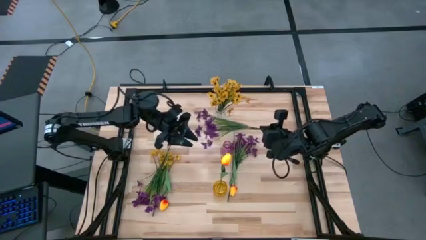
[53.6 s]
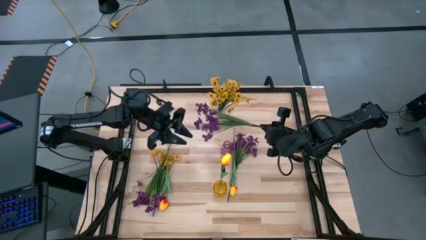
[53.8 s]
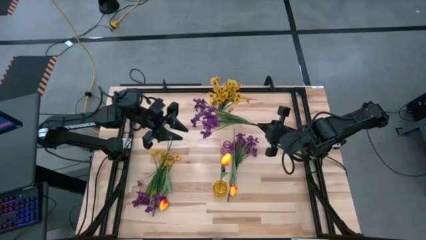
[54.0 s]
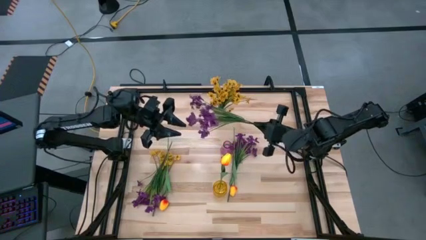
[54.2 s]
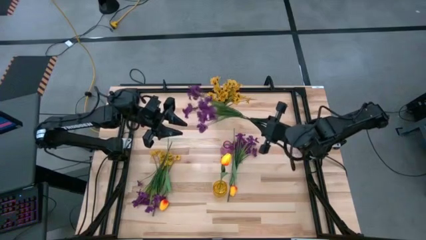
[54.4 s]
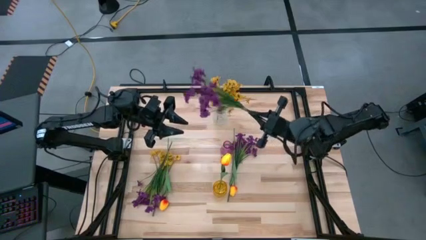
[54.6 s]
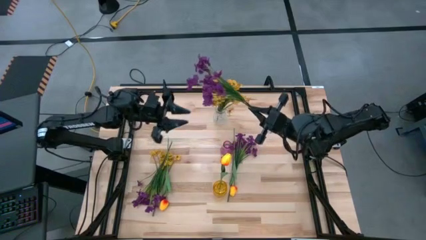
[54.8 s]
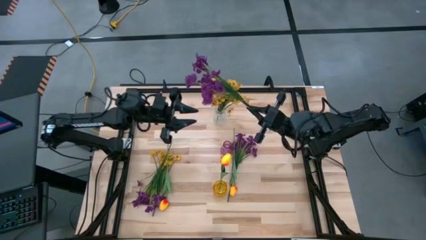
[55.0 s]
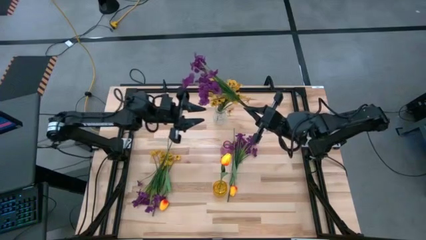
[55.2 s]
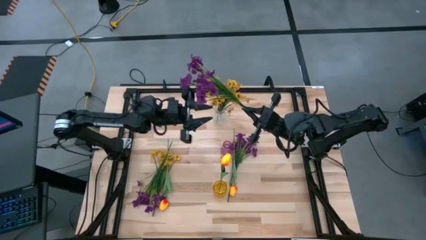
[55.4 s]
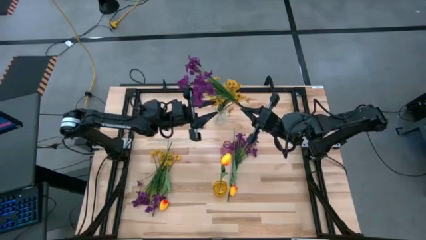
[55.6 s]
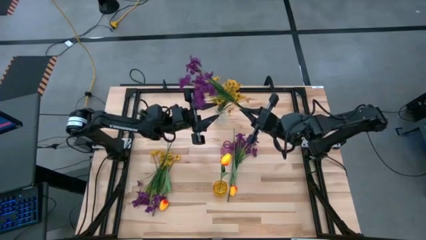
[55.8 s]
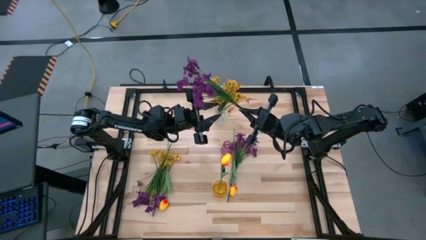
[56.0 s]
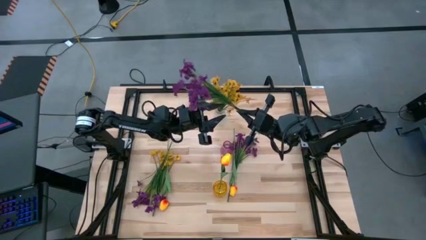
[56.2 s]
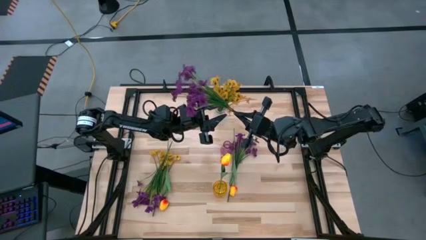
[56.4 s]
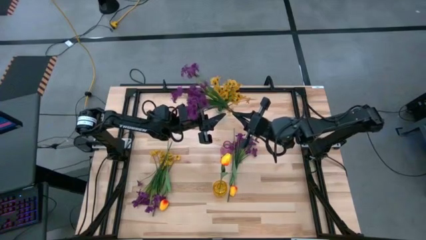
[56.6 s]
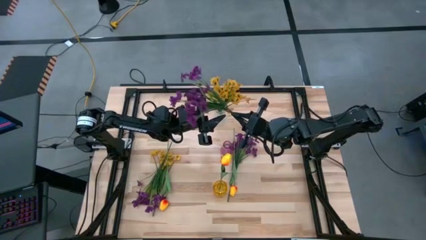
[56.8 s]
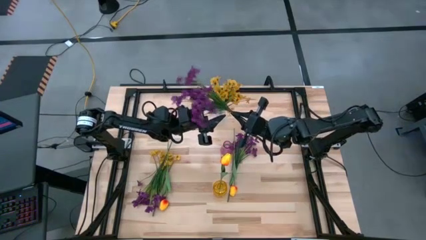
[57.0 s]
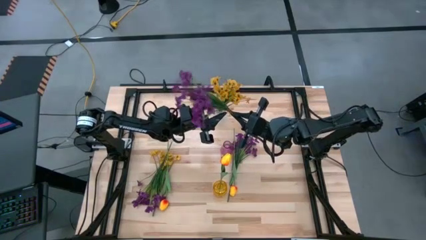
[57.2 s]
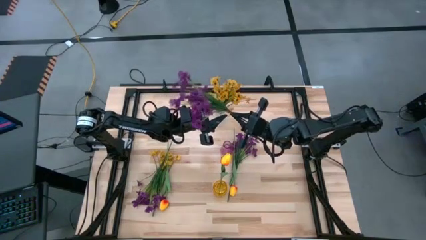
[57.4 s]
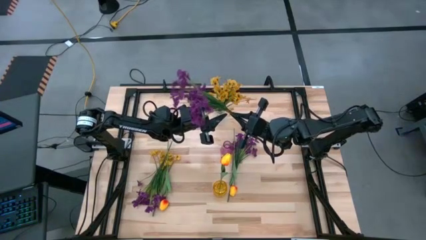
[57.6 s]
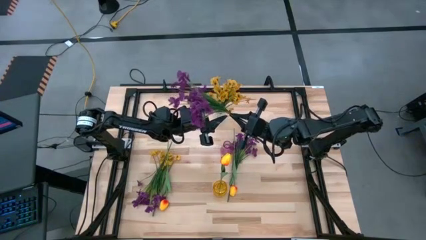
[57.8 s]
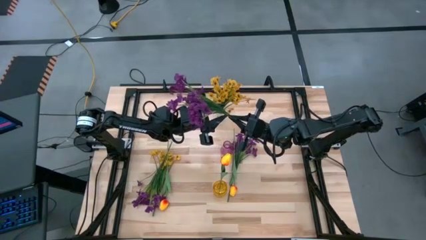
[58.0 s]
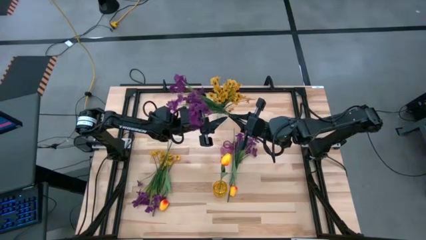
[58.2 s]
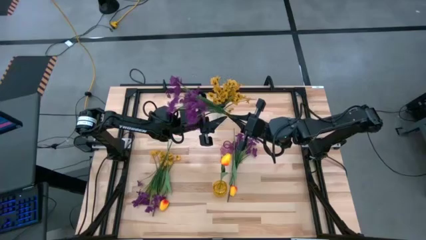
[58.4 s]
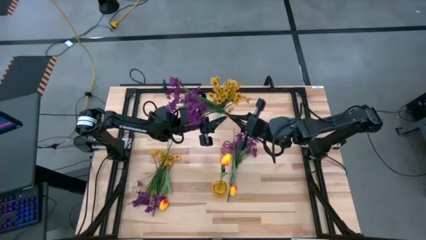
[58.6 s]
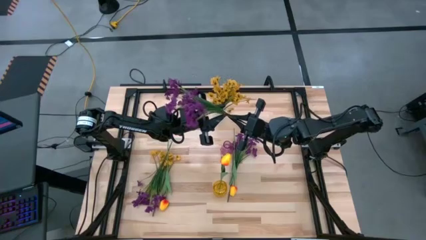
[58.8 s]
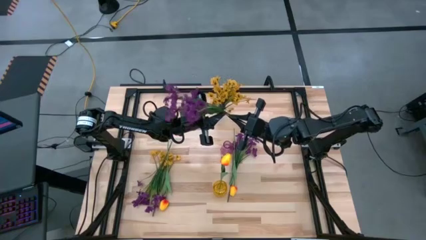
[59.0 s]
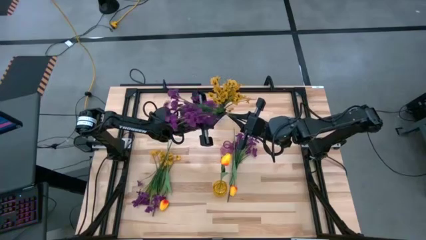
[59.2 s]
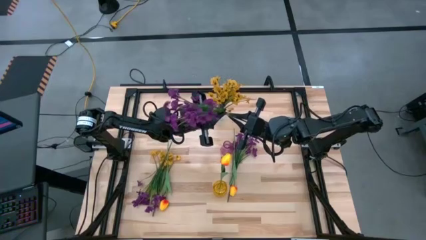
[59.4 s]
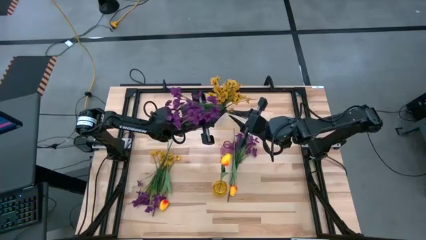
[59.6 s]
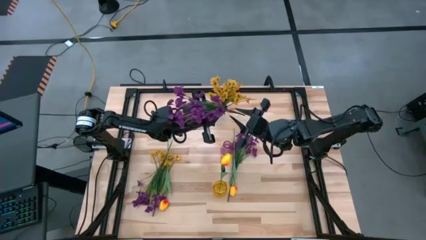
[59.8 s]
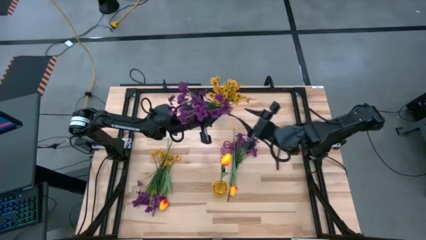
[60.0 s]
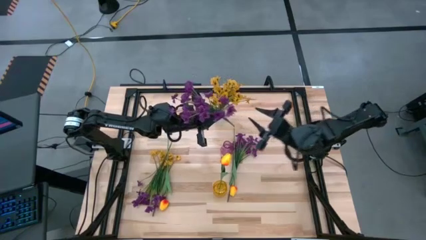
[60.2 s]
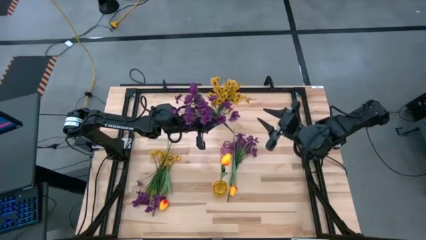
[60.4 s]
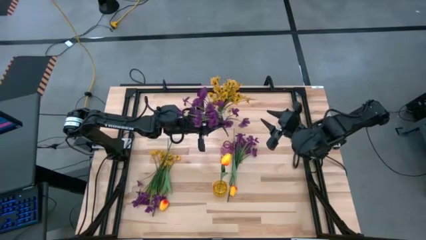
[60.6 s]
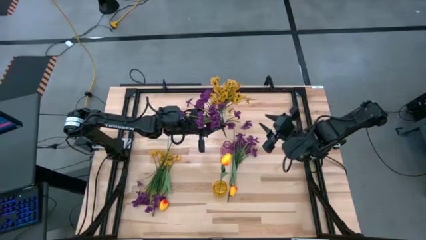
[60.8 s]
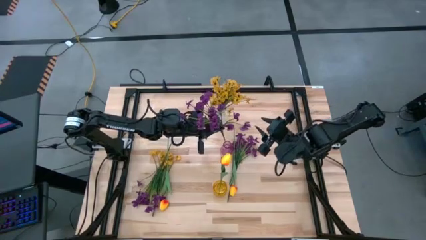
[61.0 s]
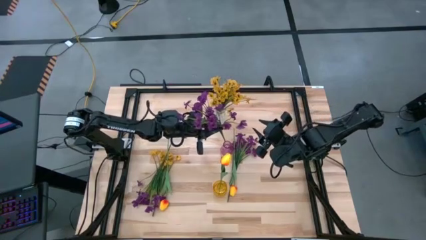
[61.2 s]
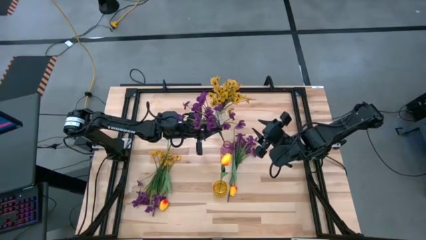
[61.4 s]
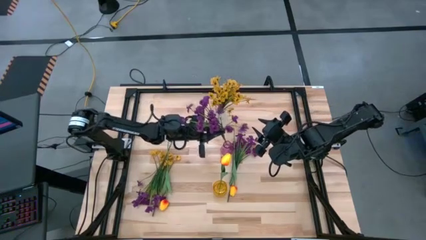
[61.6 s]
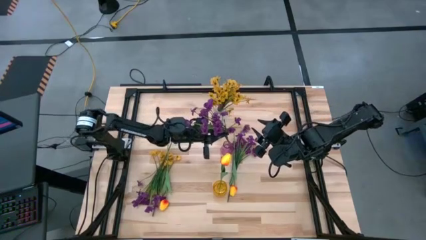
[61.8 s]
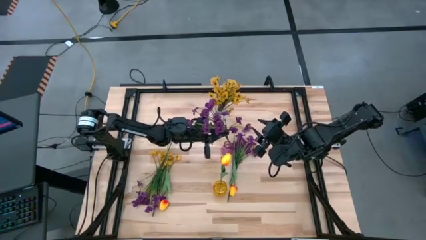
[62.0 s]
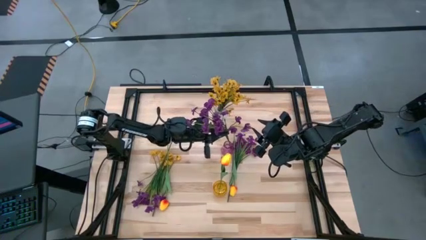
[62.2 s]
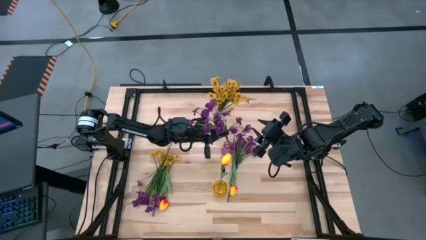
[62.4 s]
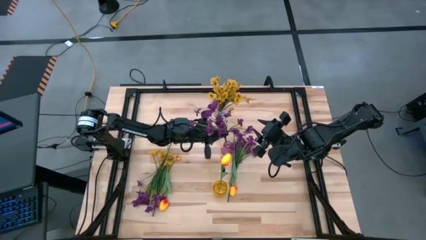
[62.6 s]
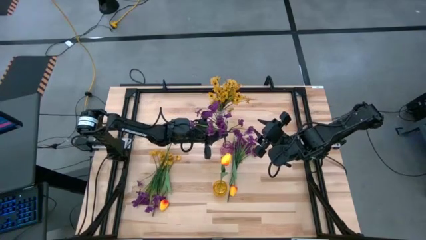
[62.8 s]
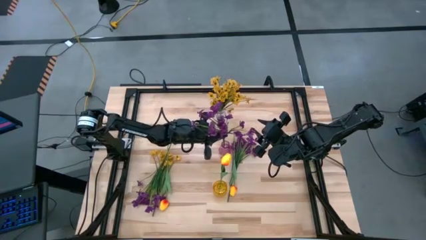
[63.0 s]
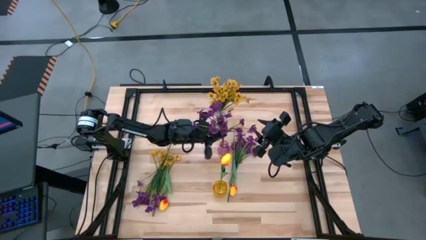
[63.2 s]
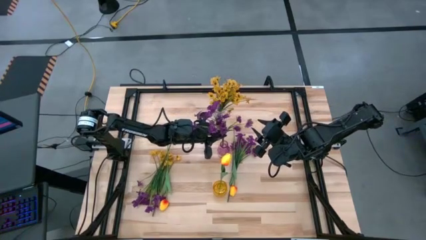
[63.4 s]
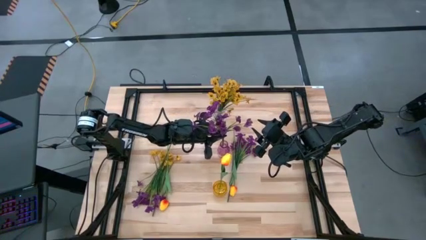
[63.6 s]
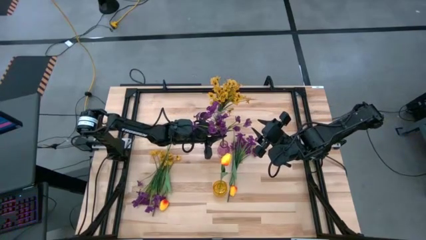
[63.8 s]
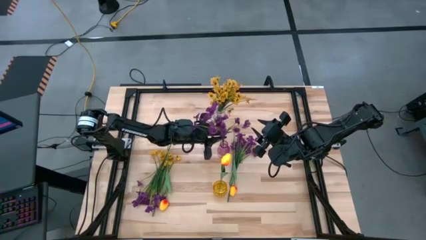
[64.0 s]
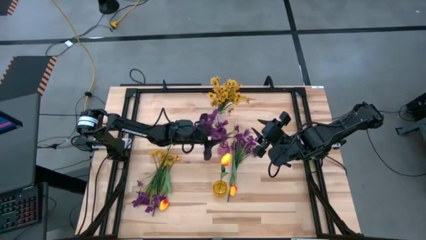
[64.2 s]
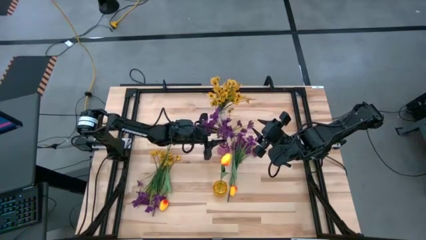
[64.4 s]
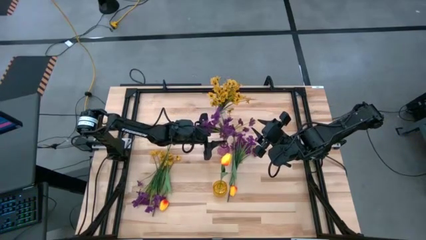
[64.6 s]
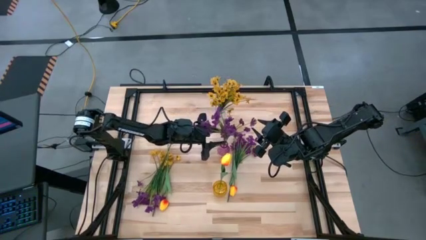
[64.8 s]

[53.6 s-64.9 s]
Task: Sort flowers into vase by color
Put the middle violet flowers into the violet vase
